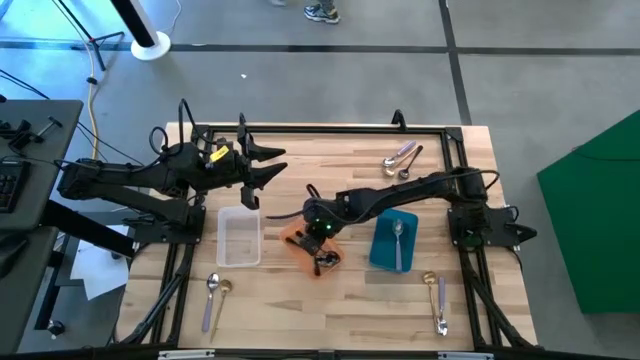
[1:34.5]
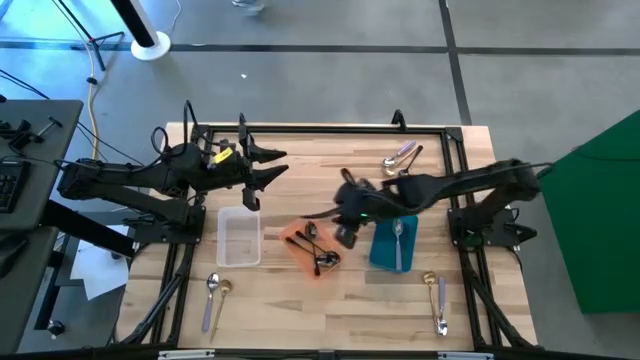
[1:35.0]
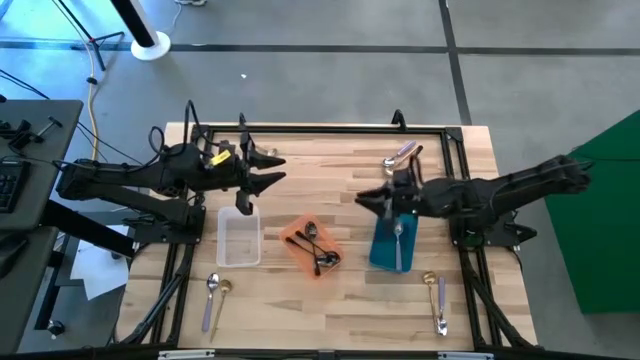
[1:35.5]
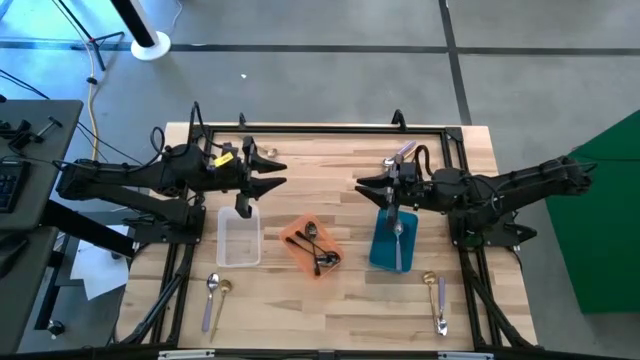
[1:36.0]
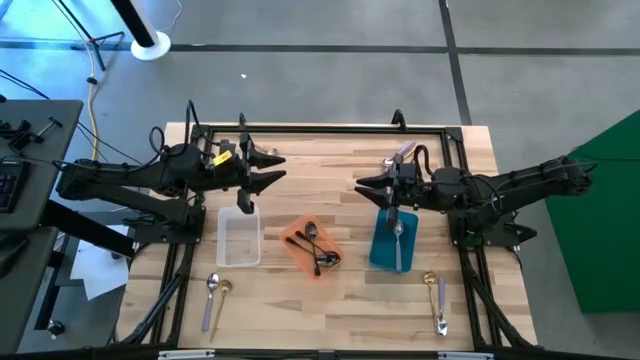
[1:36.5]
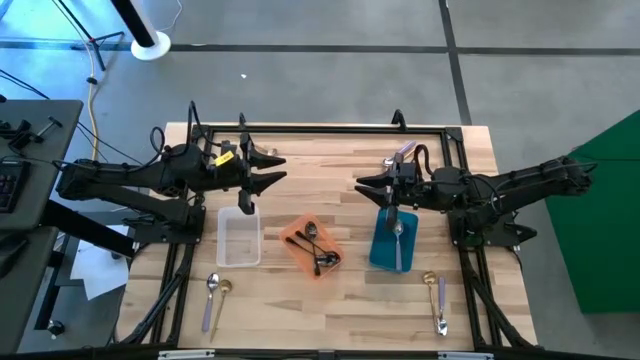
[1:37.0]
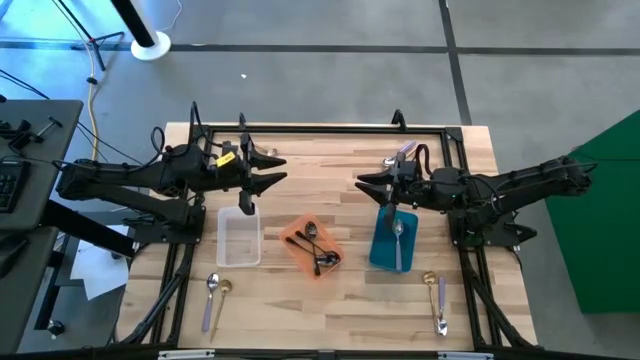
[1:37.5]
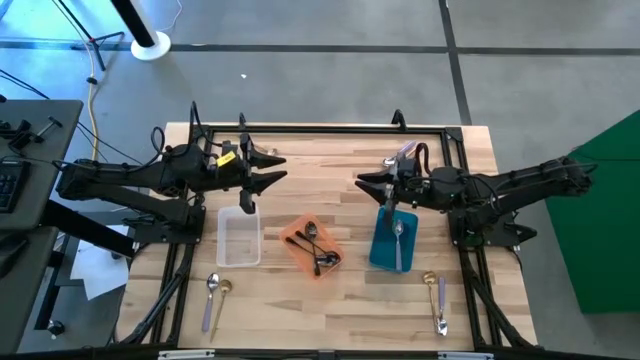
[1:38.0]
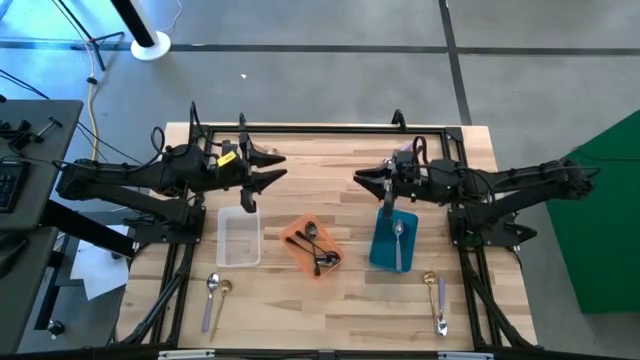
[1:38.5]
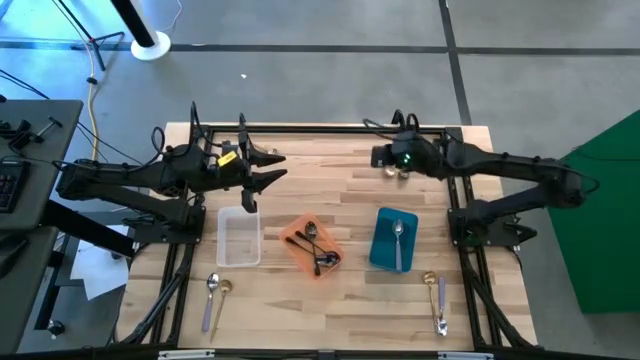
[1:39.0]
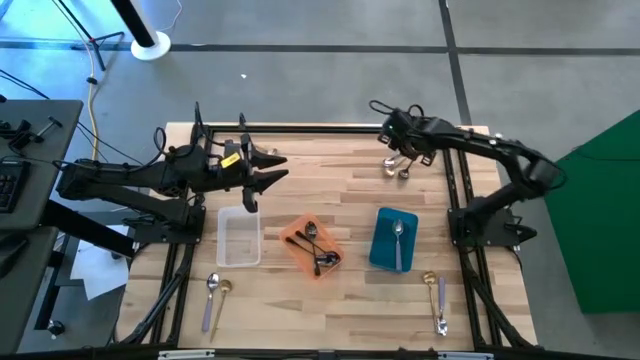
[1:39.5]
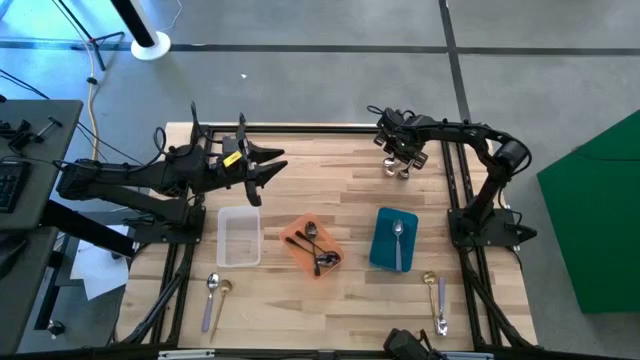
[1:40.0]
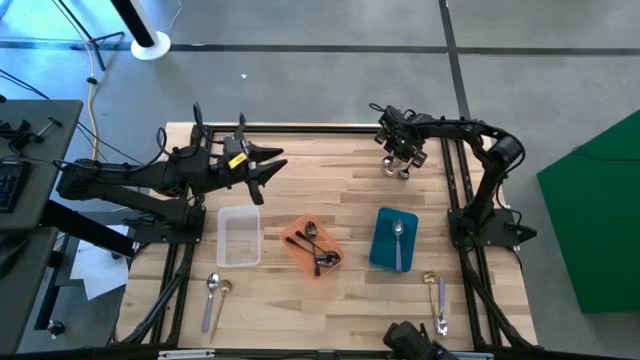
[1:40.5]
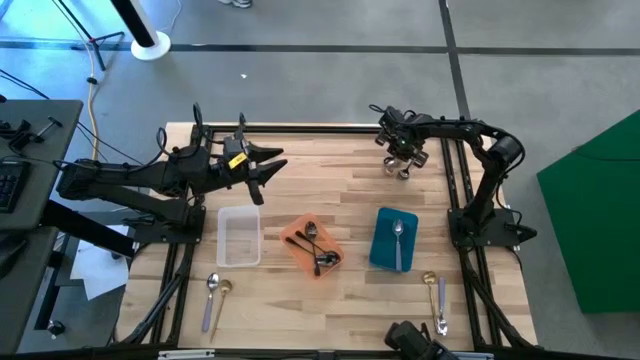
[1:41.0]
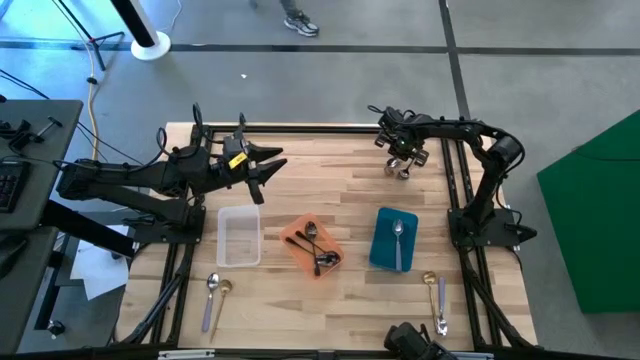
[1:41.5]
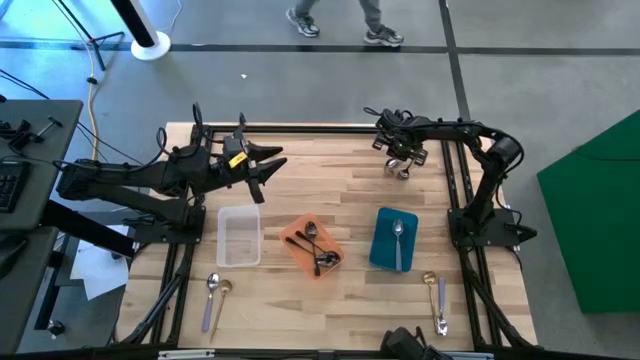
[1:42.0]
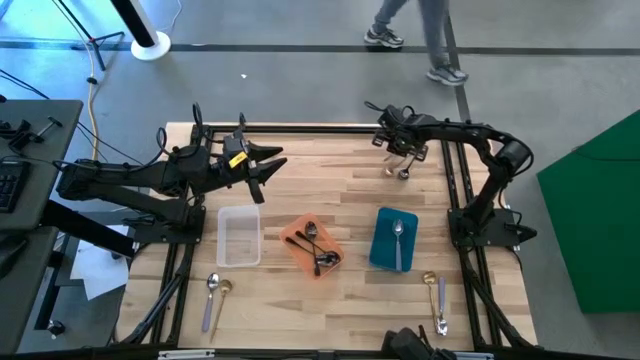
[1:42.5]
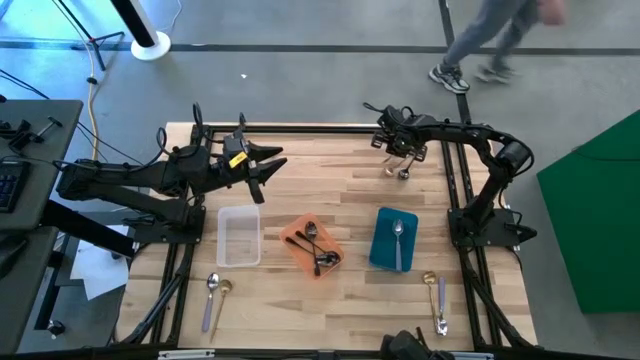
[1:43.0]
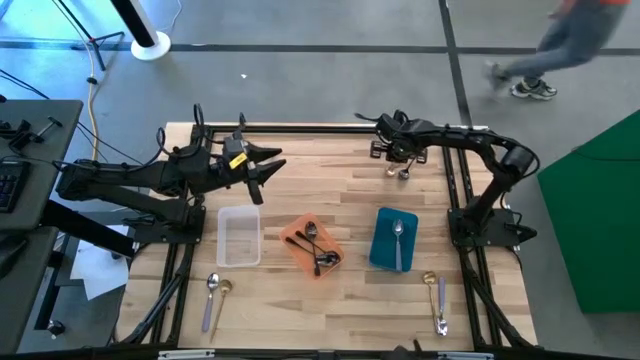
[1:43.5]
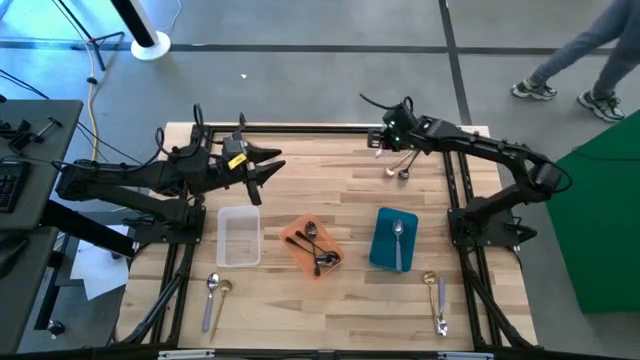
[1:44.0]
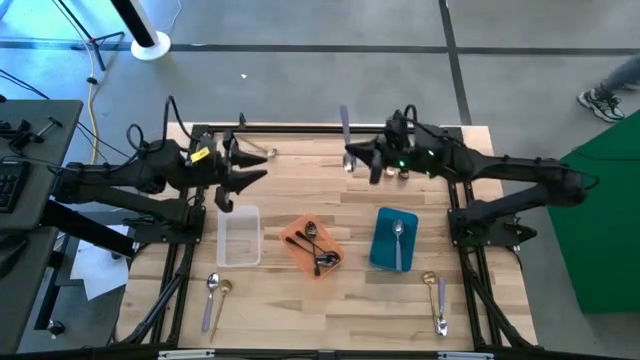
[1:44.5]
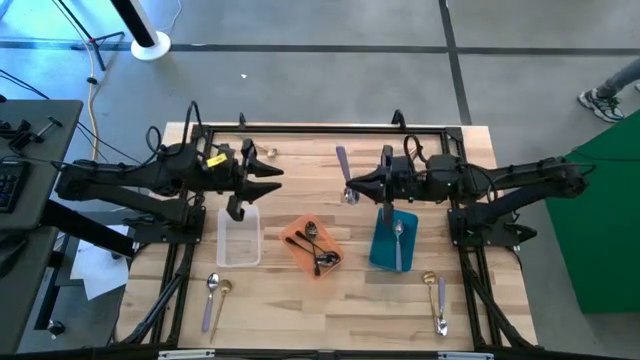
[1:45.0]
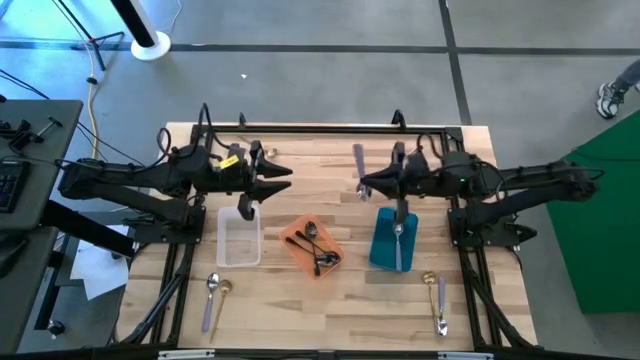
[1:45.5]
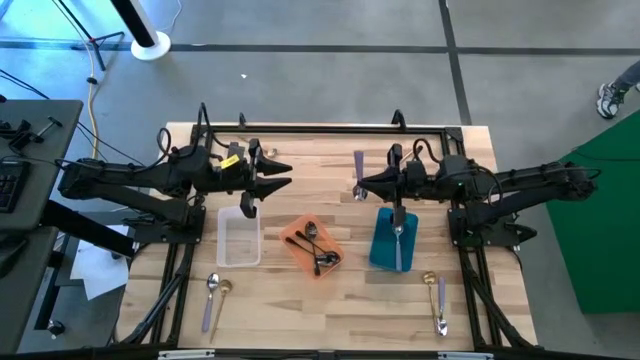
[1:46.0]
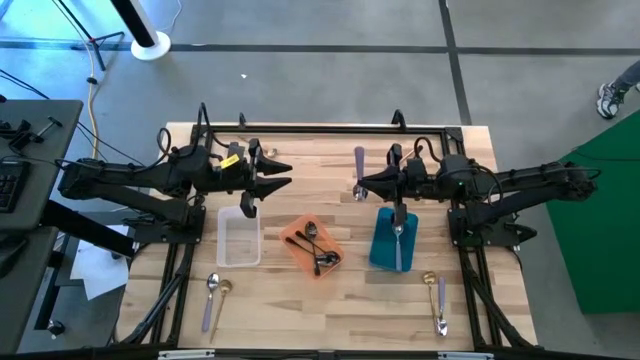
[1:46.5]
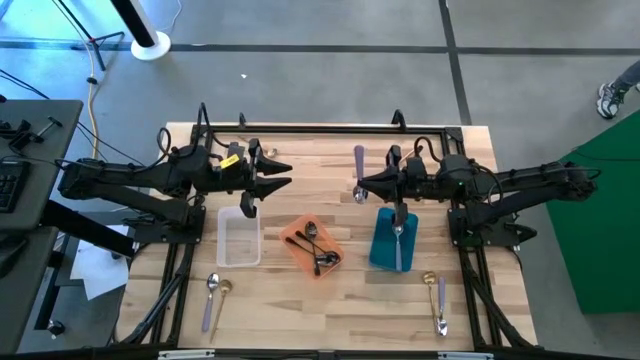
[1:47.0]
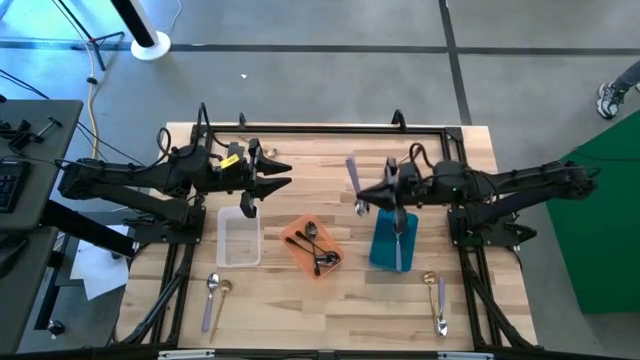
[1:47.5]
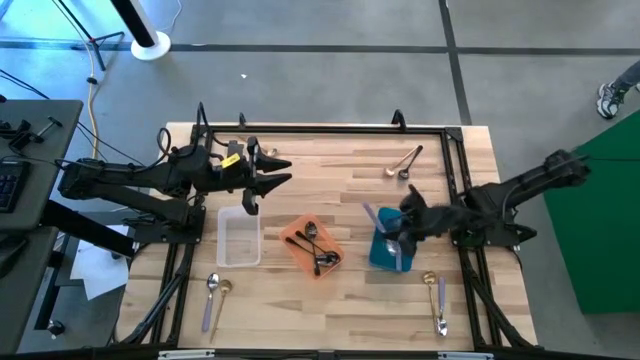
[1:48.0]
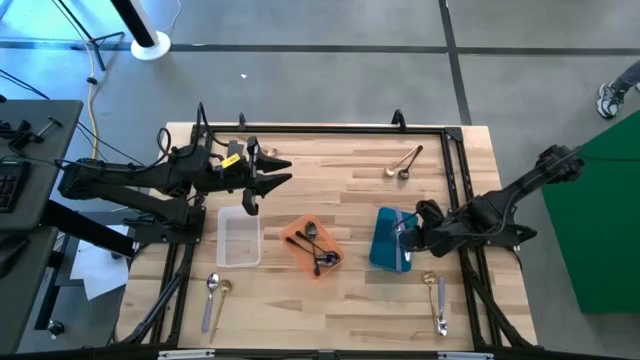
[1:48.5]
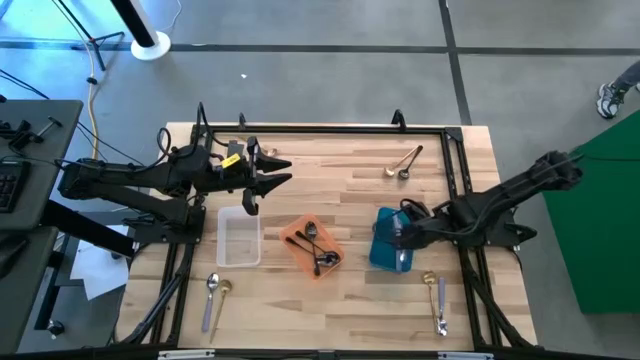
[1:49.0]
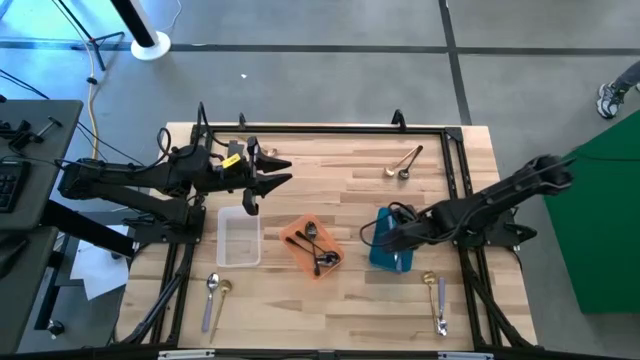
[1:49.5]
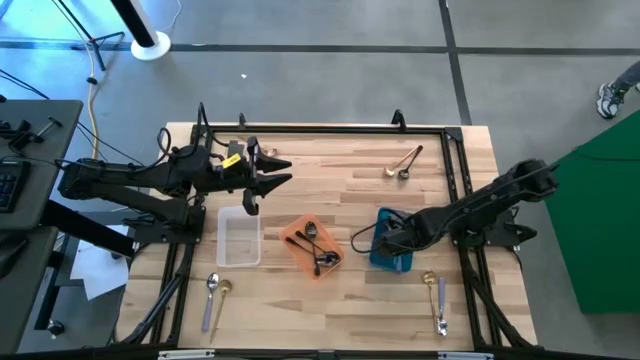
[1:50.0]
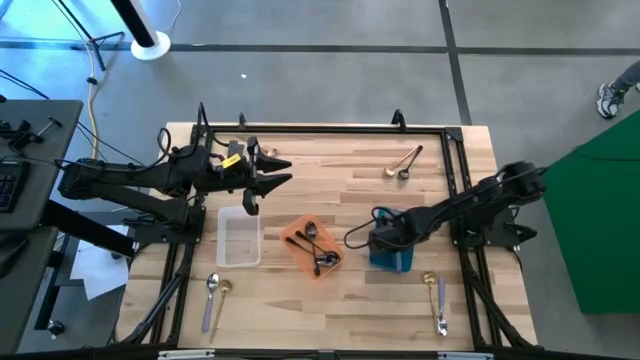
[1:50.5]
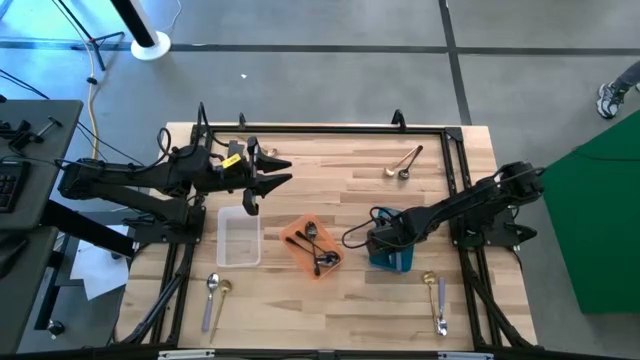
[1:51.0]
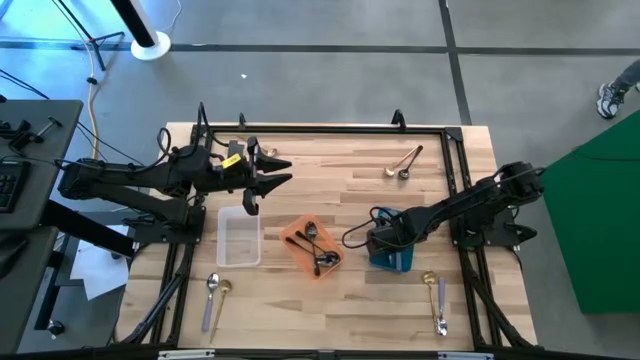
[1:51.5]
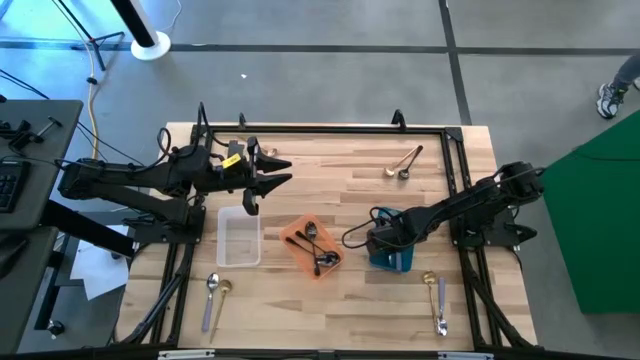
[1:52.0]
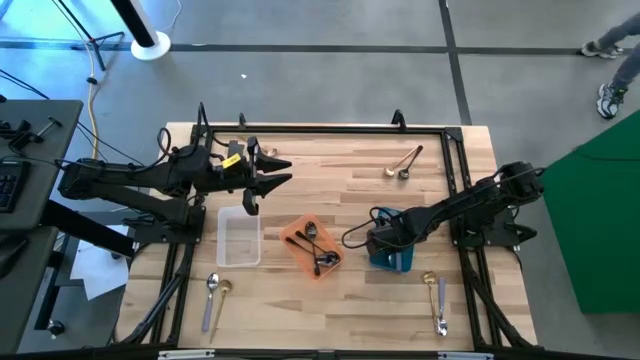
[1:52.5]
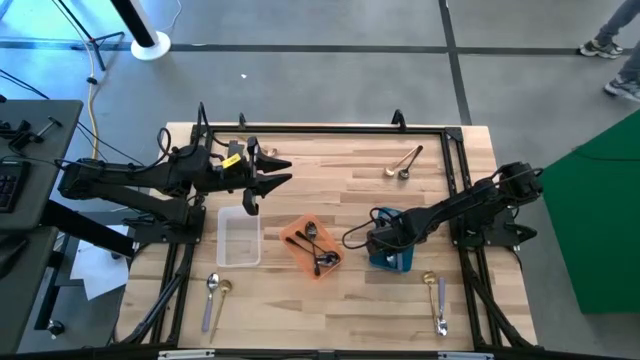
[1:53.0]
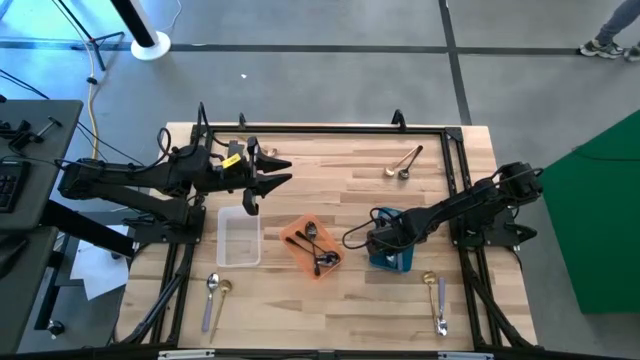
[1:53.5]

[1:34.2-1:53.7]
Task: Sort silverware by color (type)
Put the top purple spoon into the blue bin
